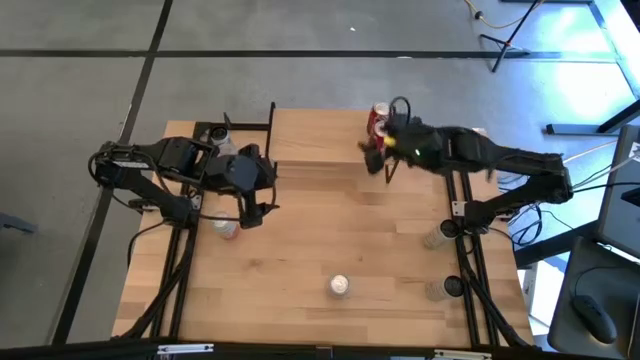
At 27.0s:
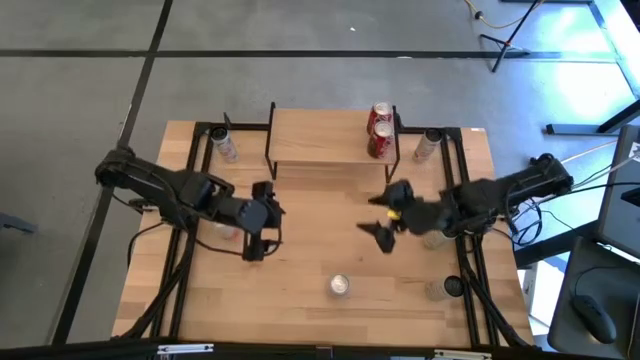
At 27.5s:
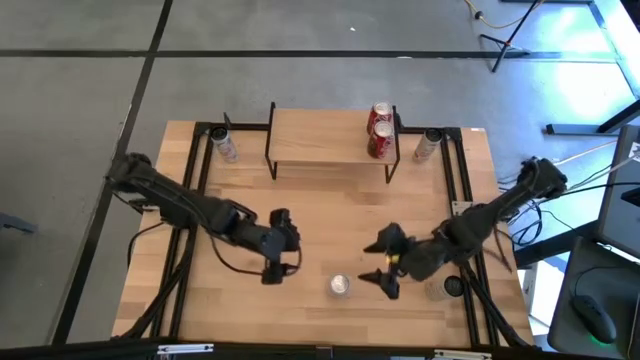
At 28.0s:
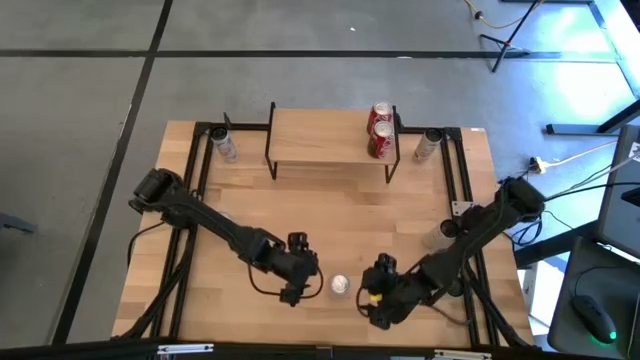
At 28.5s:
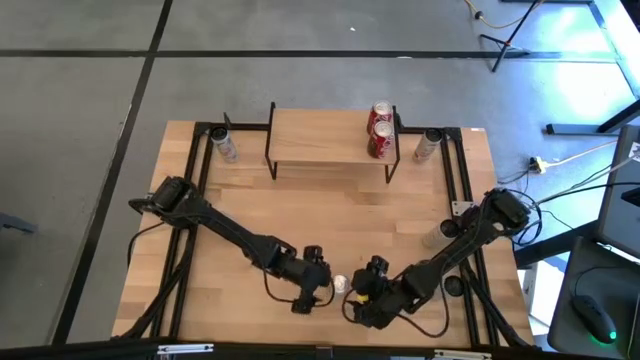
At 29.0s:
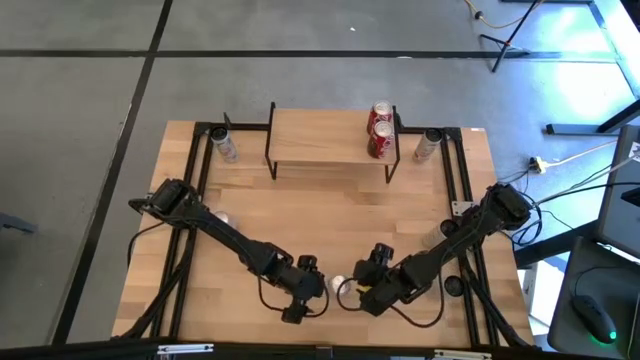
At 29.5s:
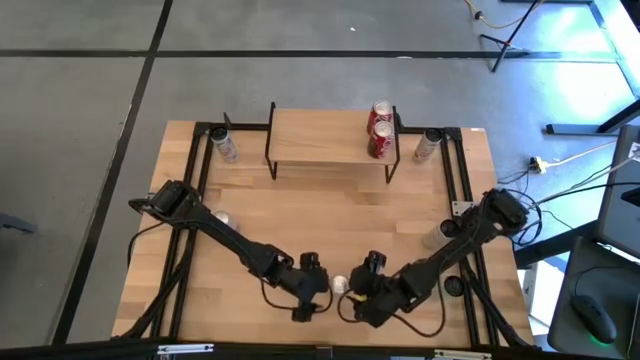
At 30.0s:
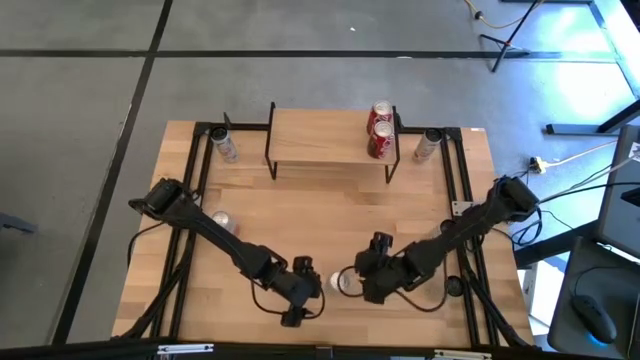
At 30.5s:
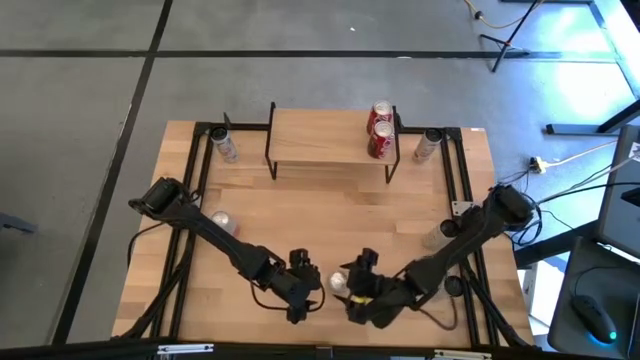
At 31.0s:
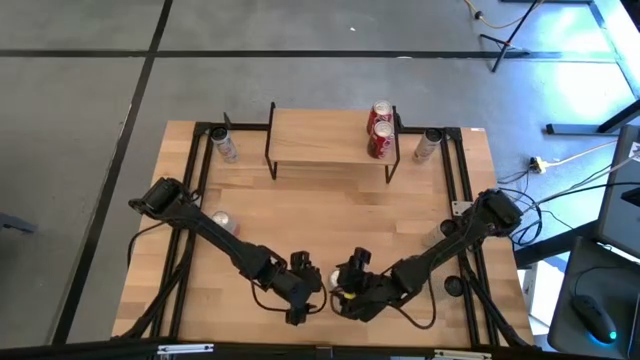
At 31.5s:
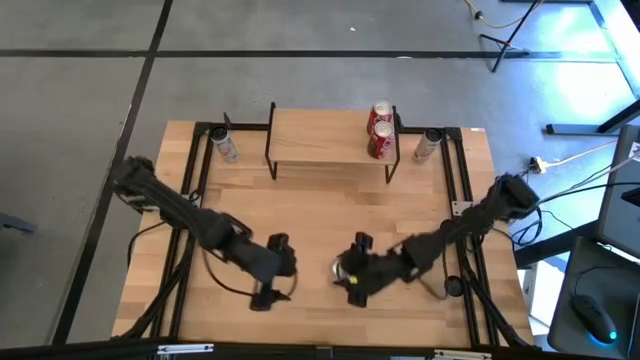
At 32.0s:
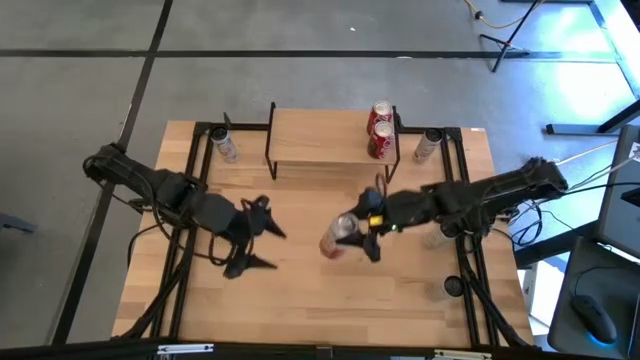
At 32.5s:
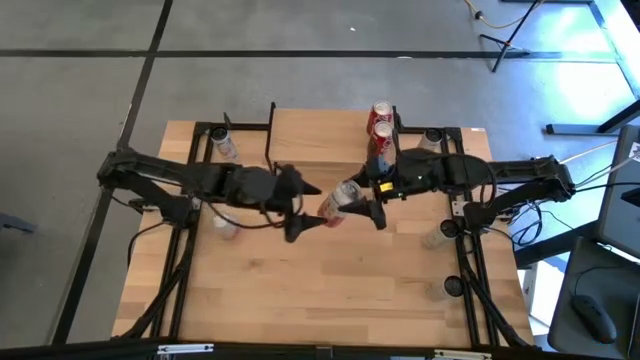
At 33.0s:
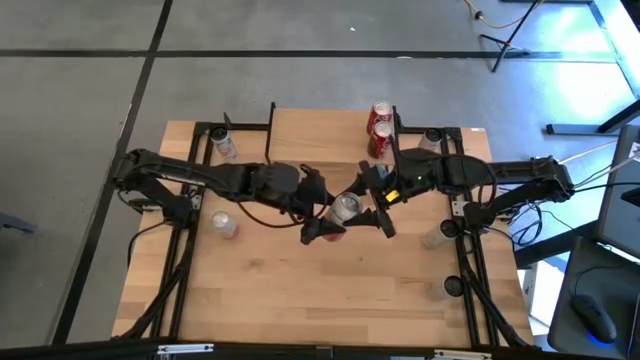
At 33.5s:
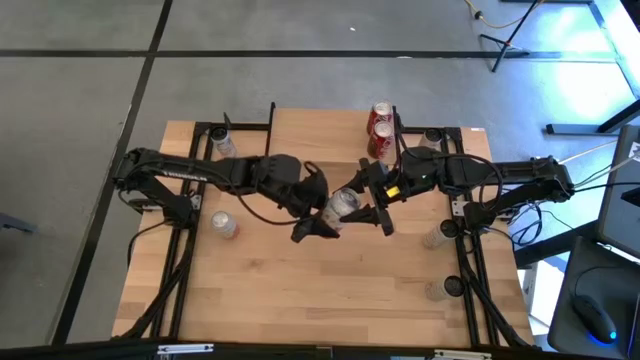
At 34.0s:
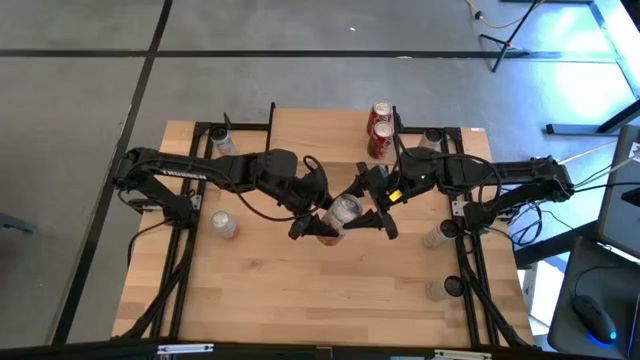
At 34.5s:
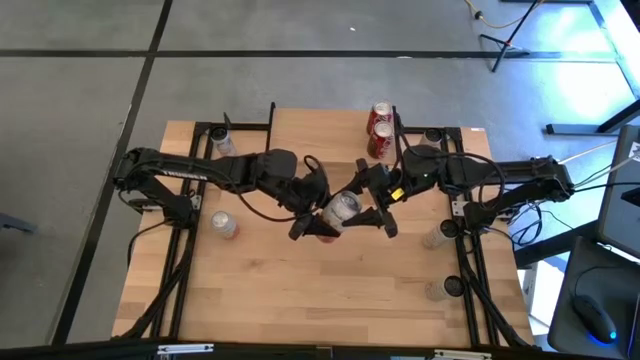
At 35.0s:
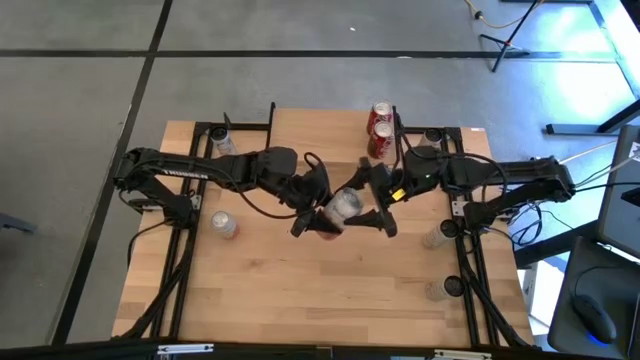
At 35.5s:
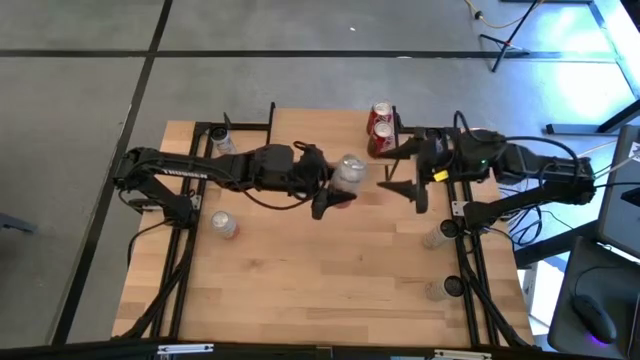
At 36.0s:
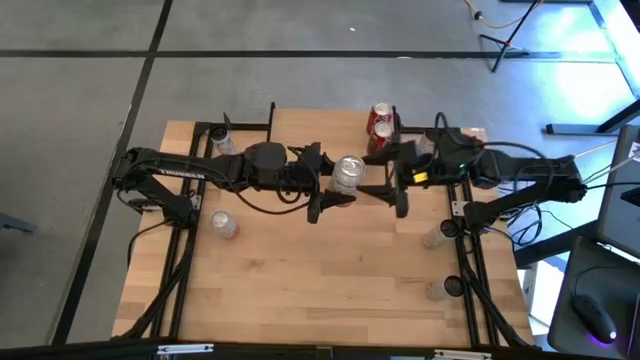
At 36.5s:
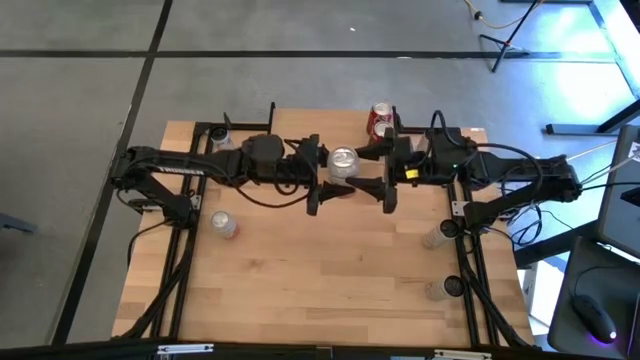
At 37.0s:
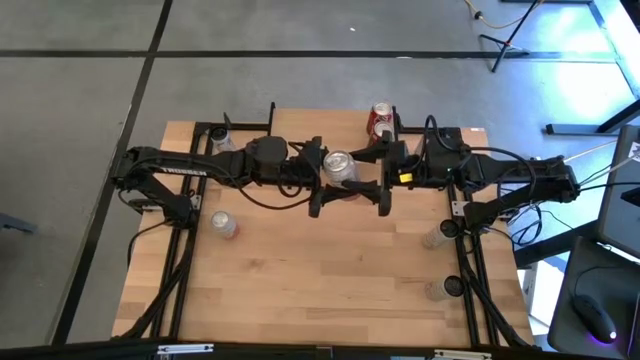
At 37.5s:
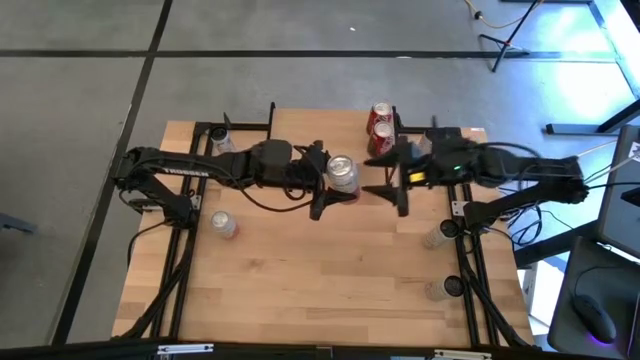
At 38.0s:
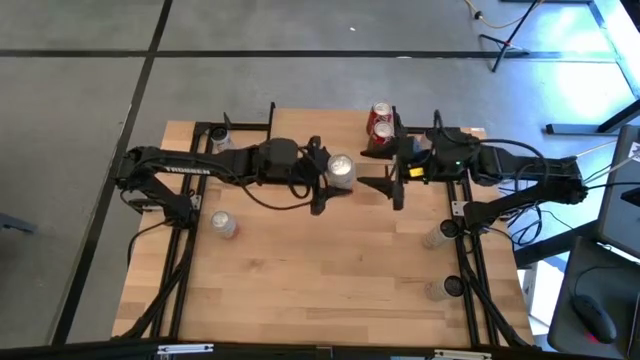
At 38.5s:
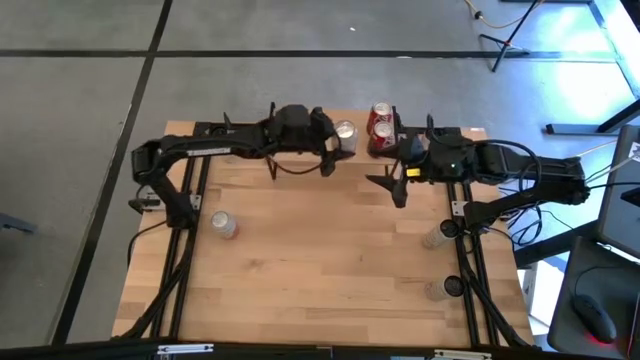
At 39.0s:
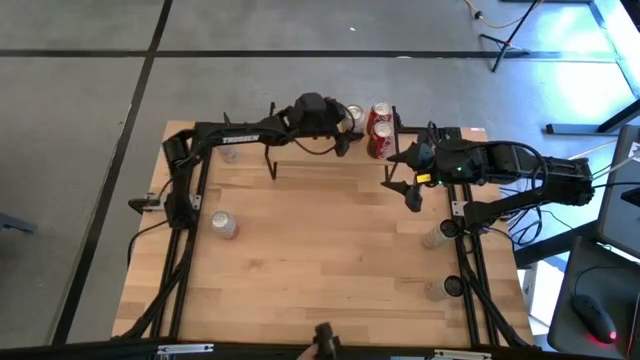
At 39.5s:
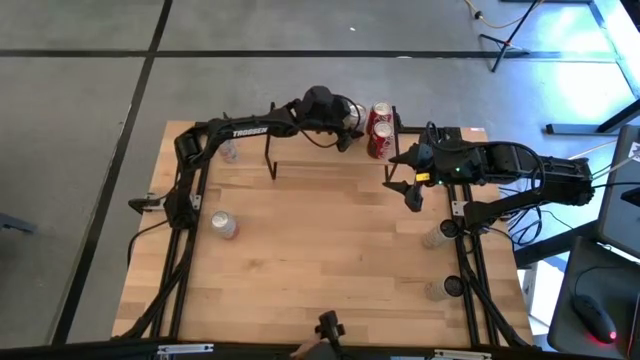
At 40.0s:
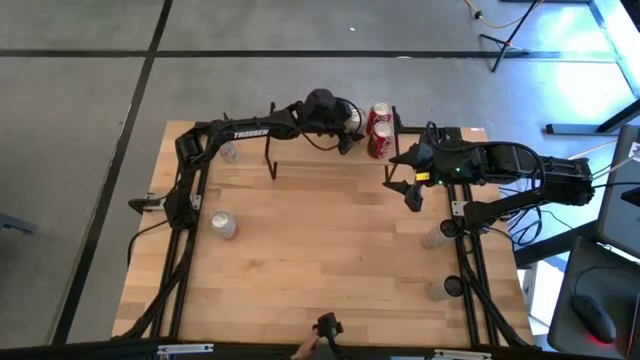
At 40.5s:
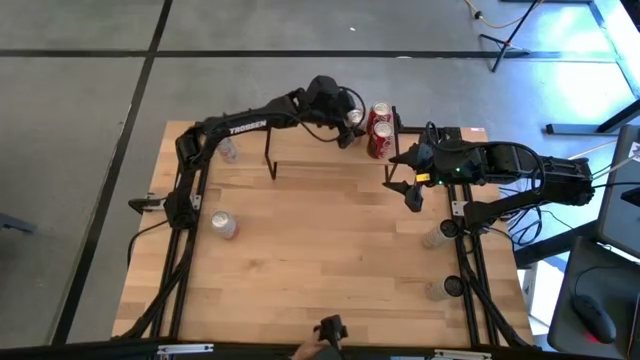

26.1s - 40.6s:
Task: Place canned beverage on shelf
Put the bottom pink soda can on the shelf

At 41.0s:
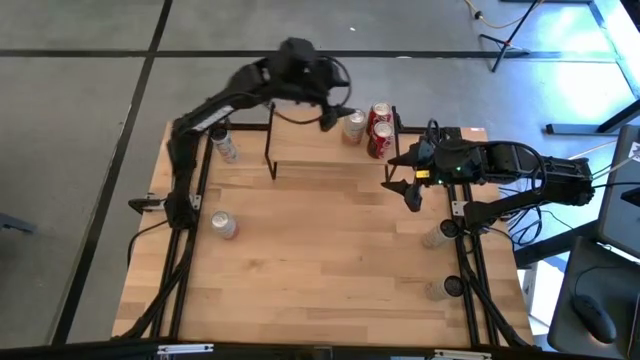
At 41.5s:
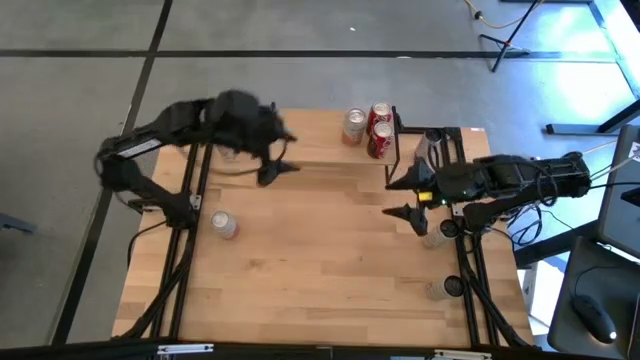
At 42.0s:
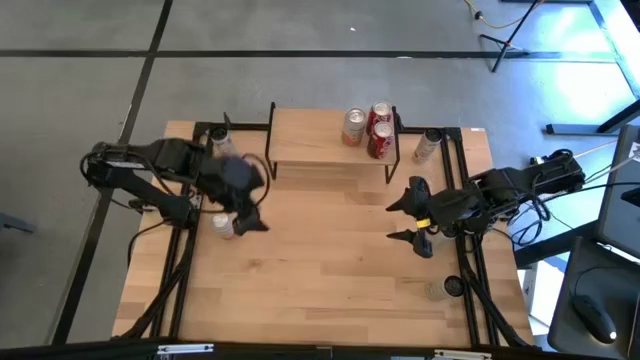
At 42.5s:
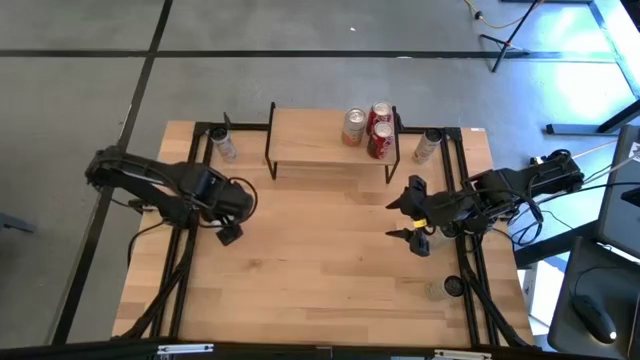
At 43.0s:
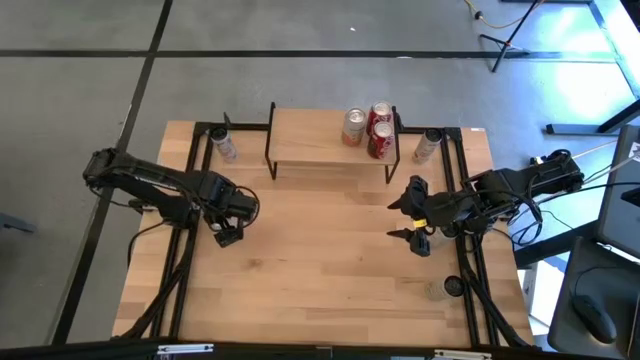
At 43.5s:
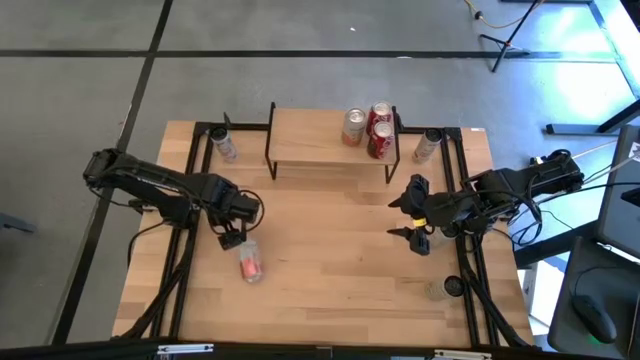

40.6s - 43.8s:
Put the pink soda can on the shelf aligned with the other pink soda can

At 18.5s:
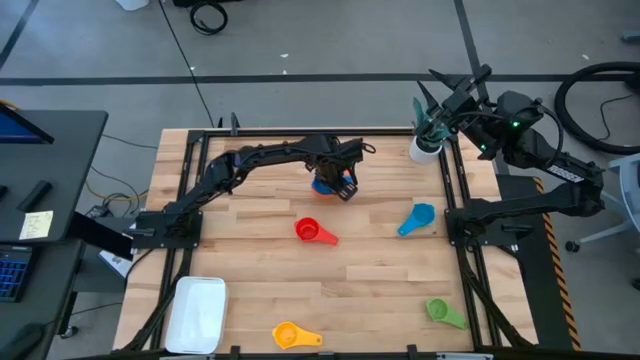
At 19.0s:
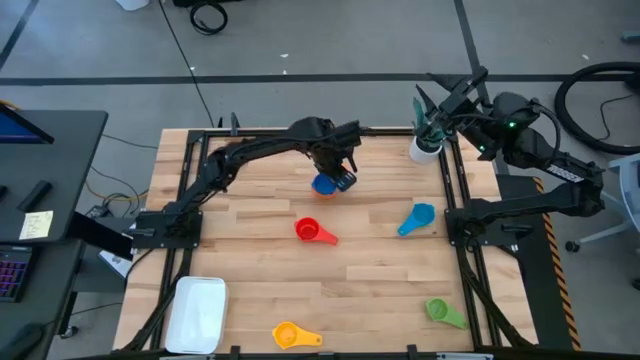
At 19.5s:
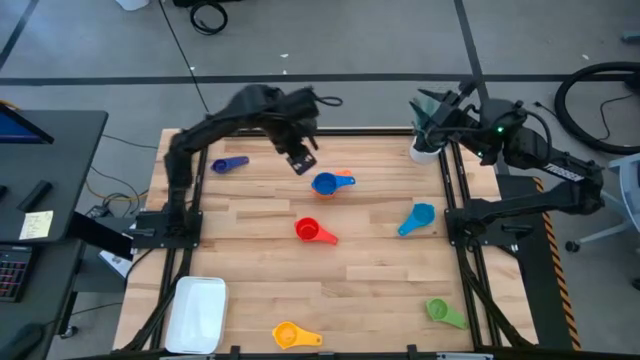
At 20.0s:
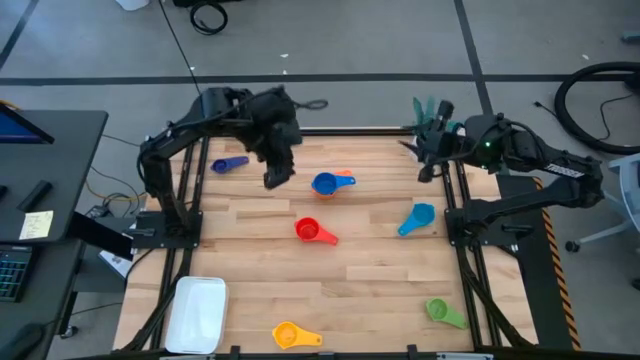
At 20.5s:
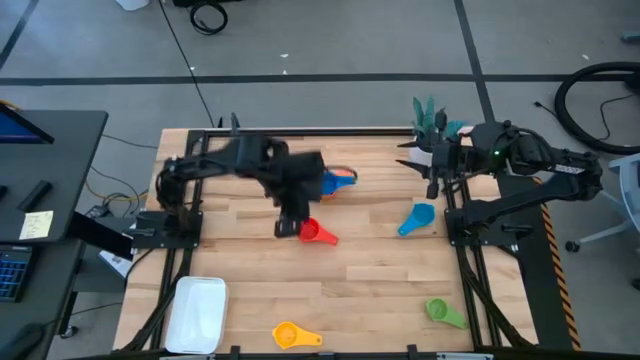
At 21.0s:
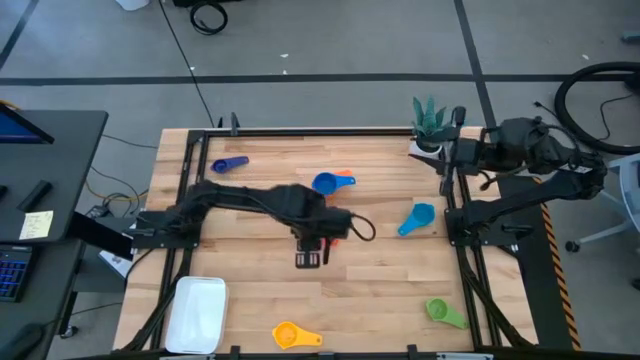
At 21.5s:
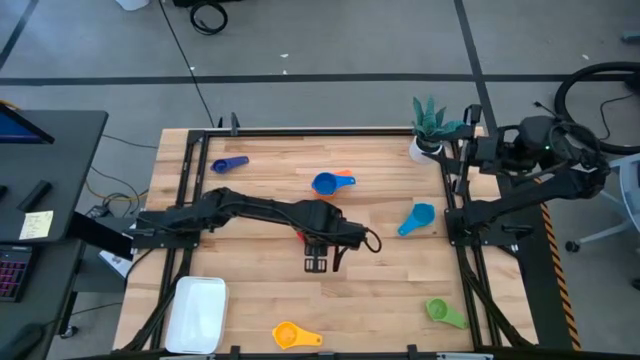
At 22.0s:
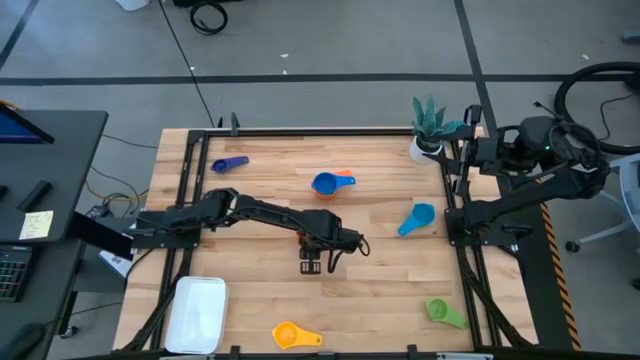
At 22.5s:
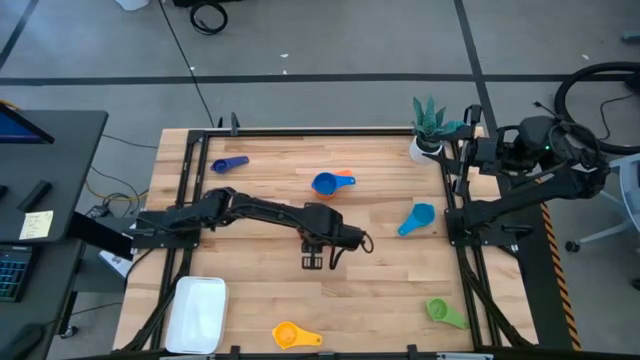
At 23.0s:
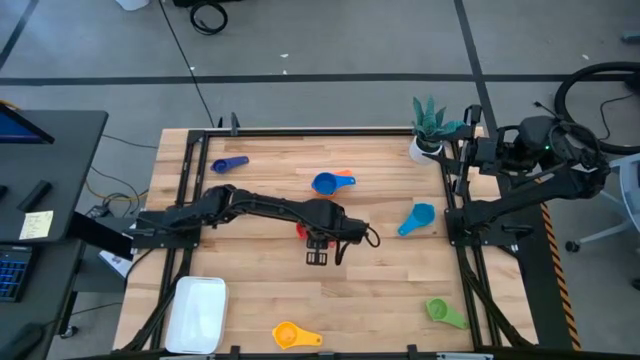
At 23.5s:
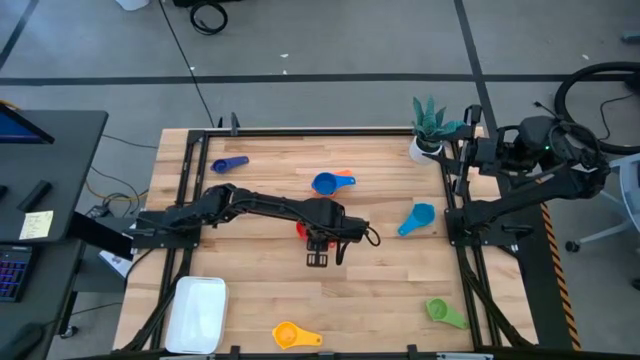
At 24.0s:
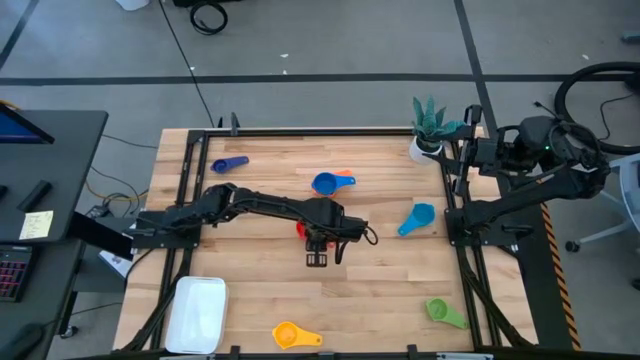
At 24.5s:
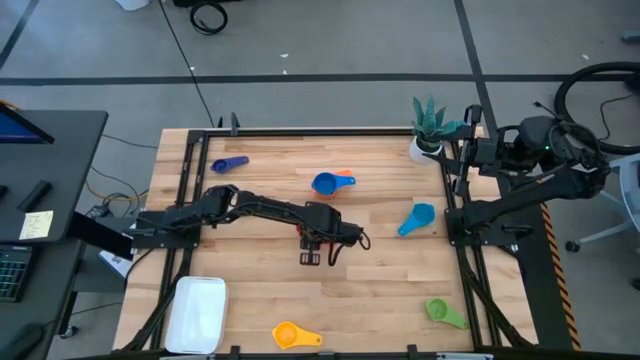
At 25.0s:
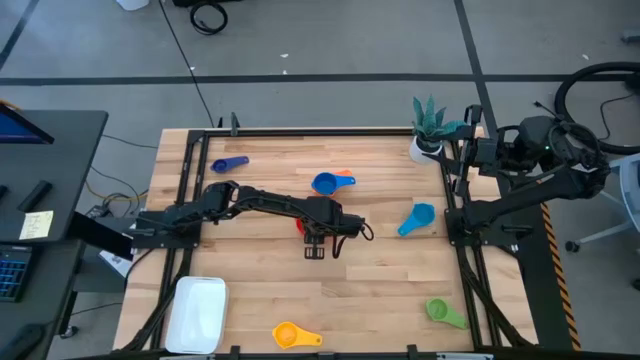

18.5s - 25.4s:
Task: Nest measuring cups in basket
Stack the red measuring cup on top of the dark blue measuring cup
